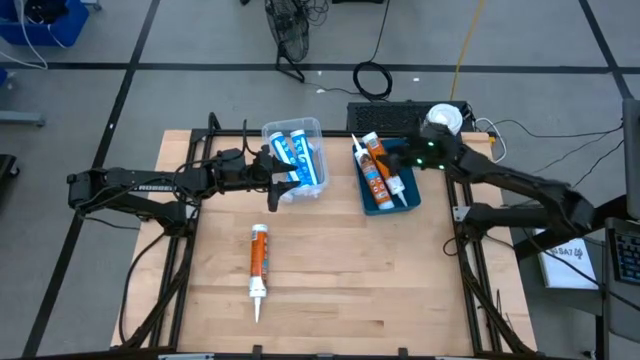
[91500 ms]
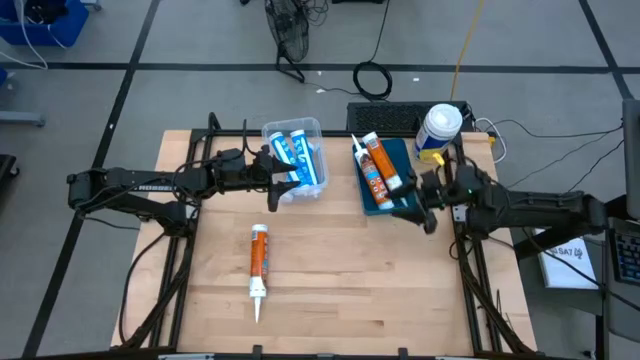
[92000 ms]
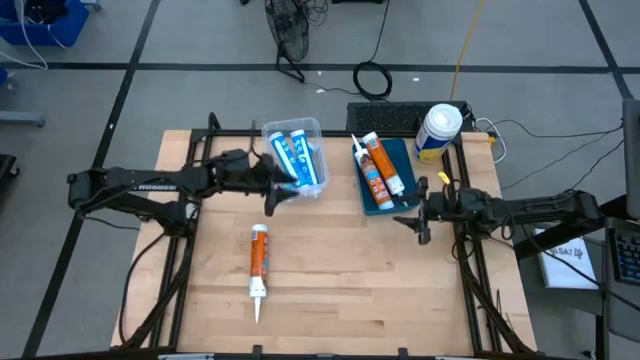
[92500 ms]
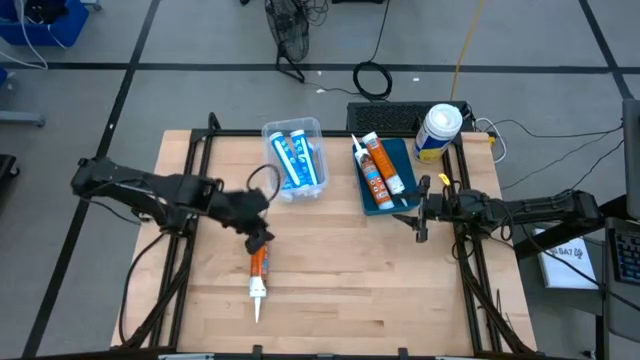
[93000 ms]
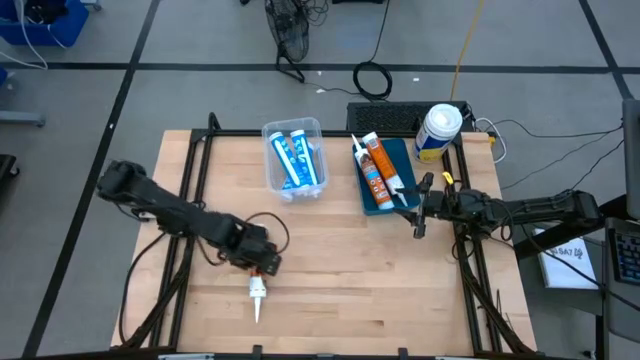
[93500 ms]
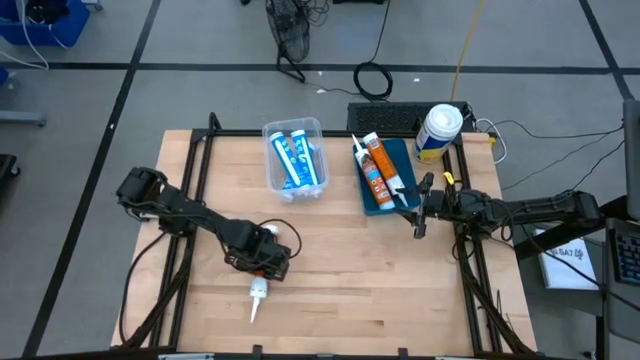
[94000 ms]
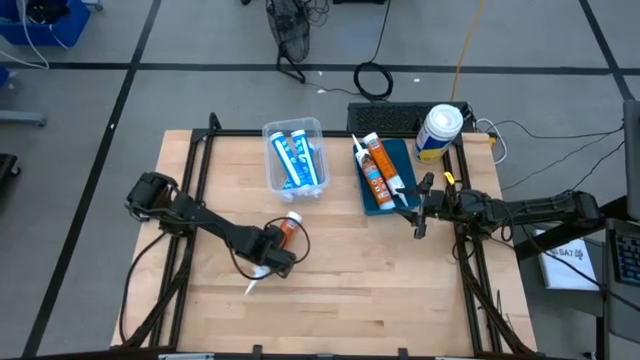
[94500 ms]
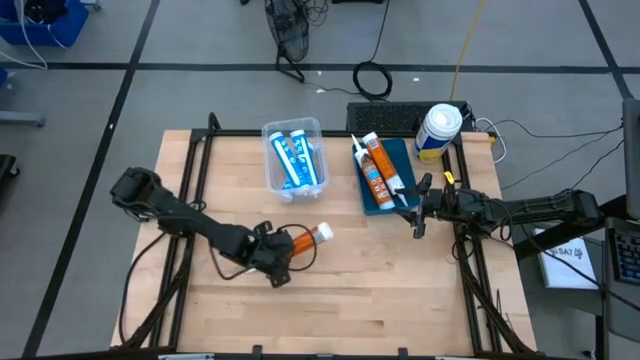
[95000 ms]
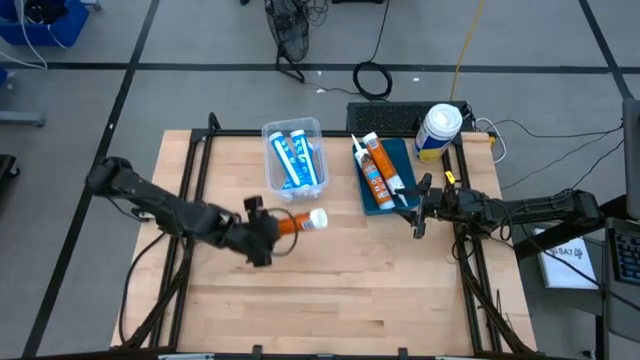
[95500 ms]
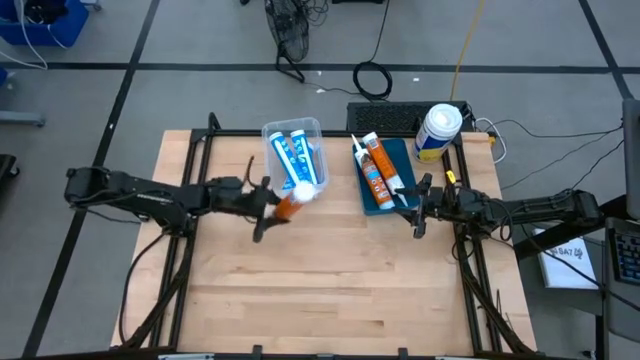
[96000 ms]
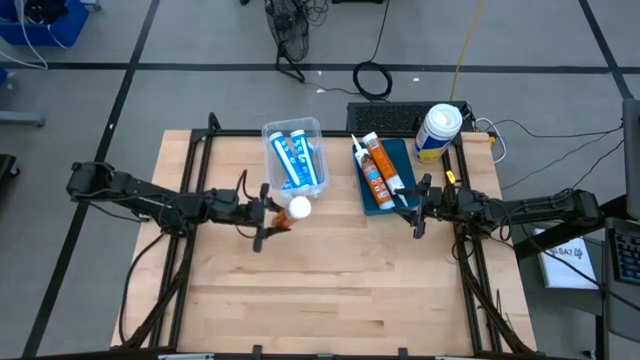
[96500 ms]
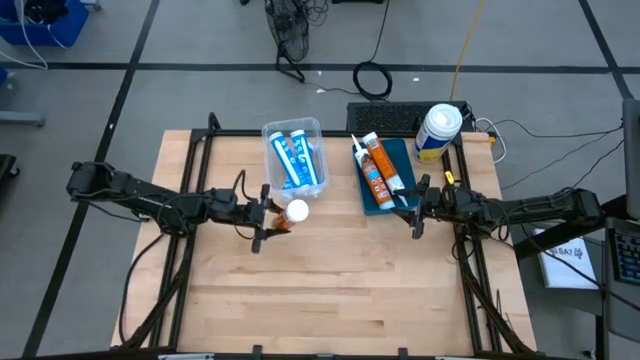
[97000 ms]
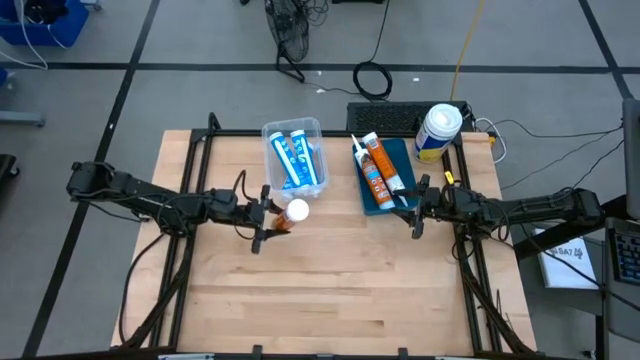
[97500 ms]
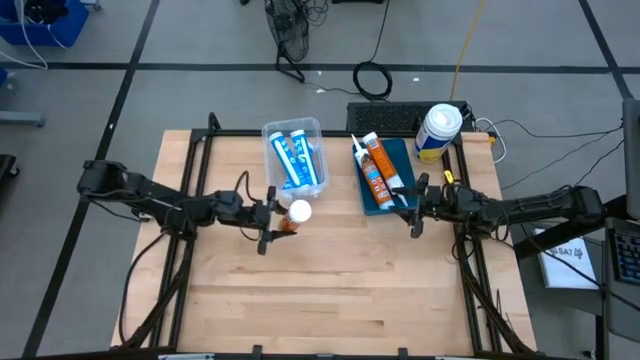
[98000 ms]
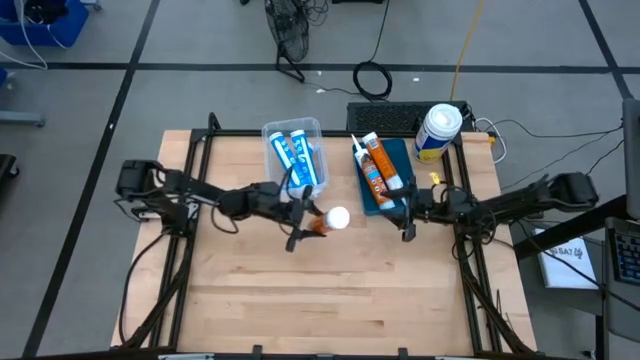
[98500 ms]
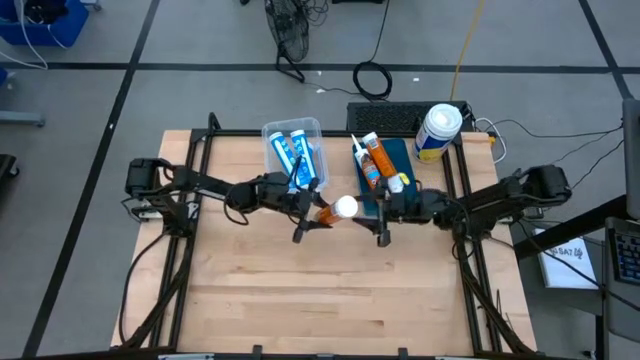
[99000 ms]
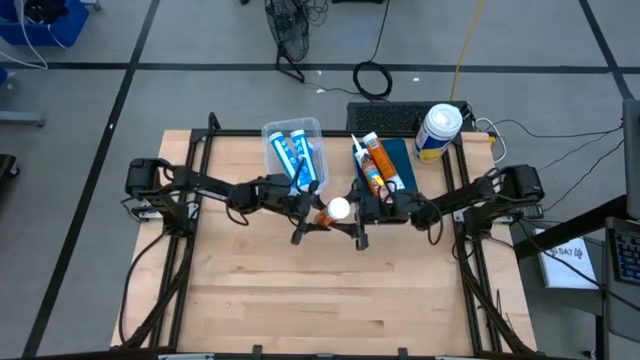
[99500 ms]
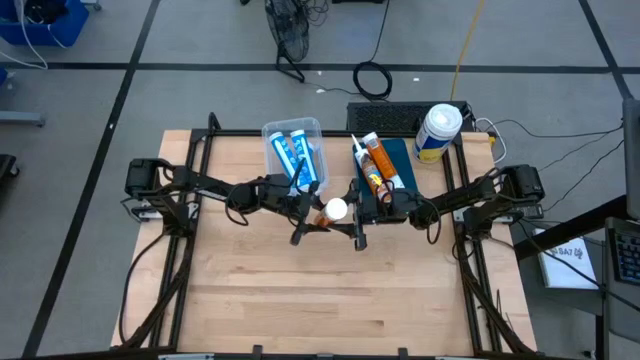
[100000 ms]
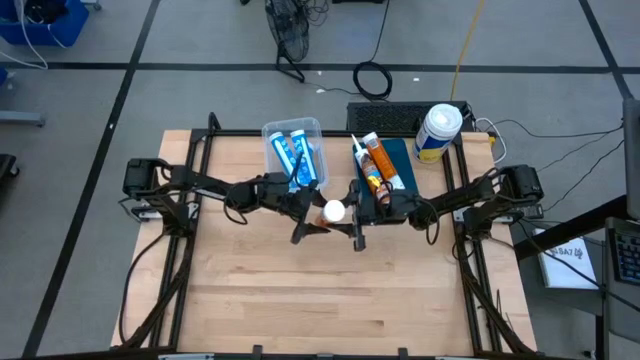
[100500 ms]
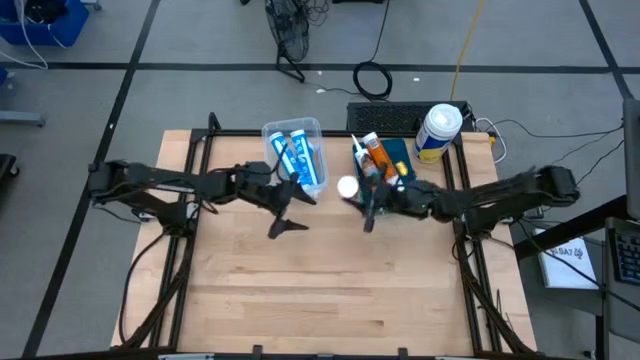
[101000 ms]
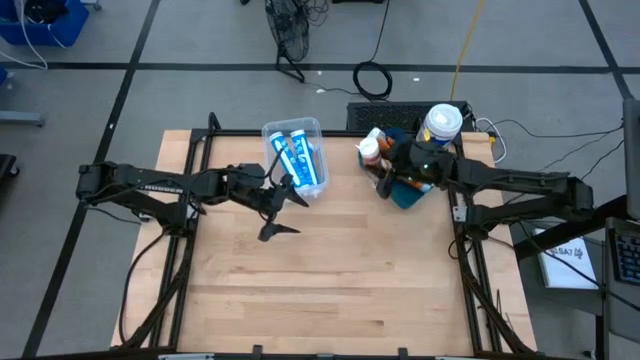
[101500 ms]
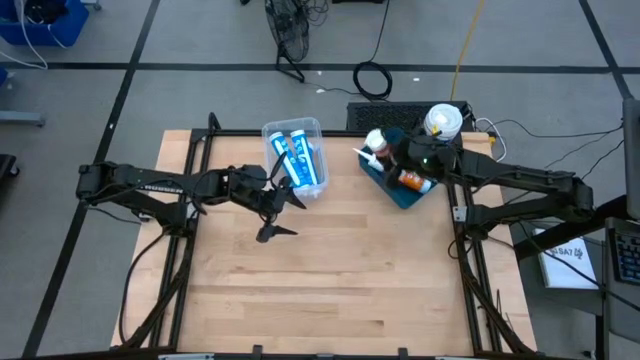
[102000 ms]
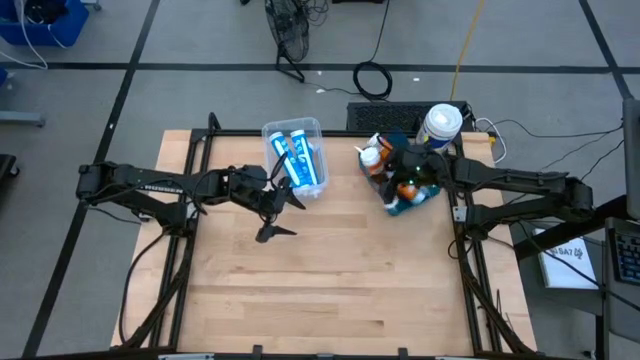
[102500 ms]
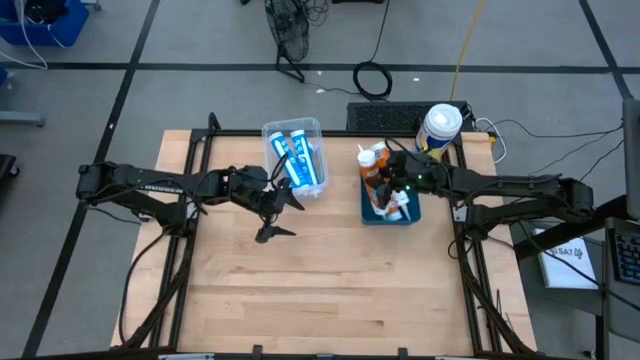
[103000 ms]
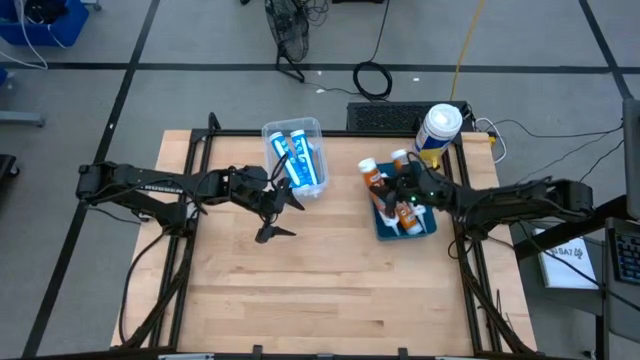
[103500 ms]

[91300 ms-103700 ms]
Task: Pick & place silicon tubes, Sealant and Lysol wipes
Put the orange sealant into the blue bin

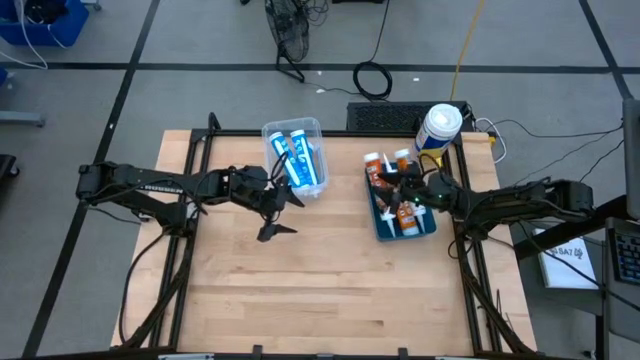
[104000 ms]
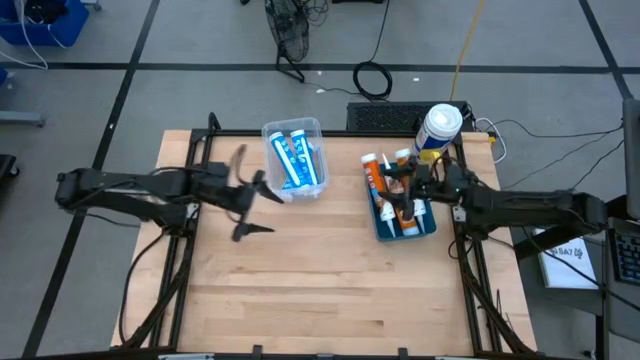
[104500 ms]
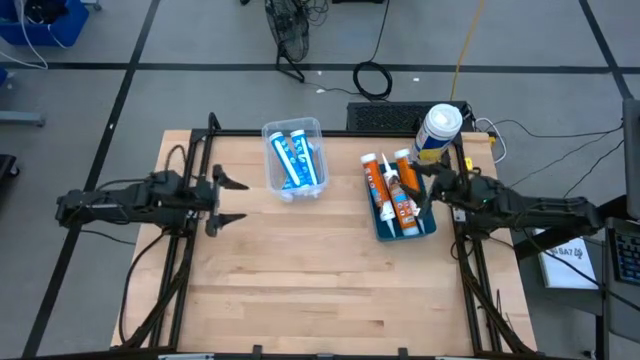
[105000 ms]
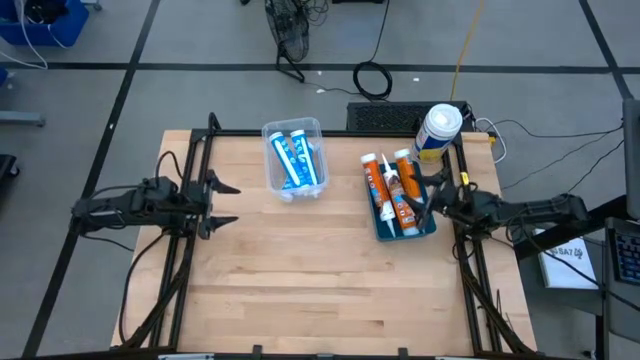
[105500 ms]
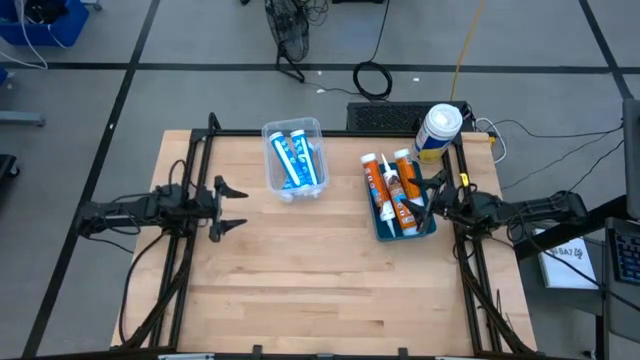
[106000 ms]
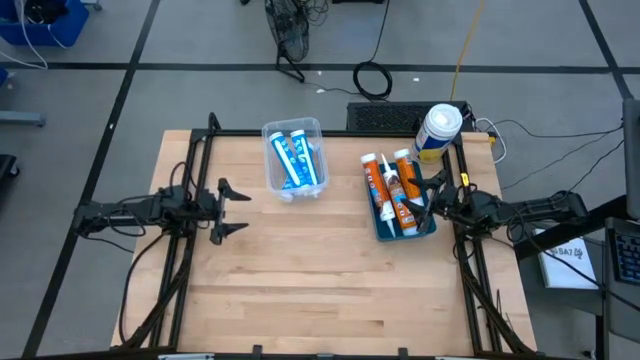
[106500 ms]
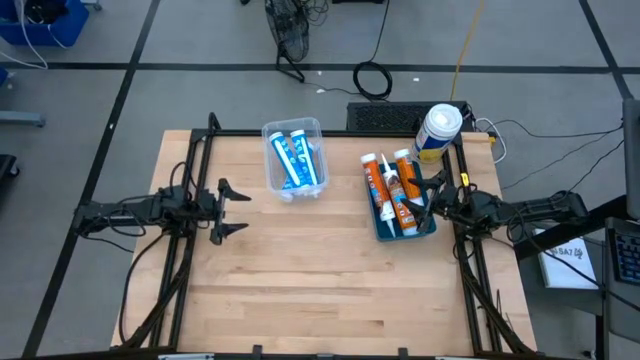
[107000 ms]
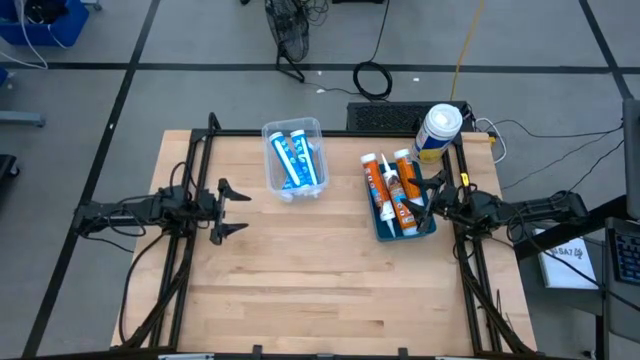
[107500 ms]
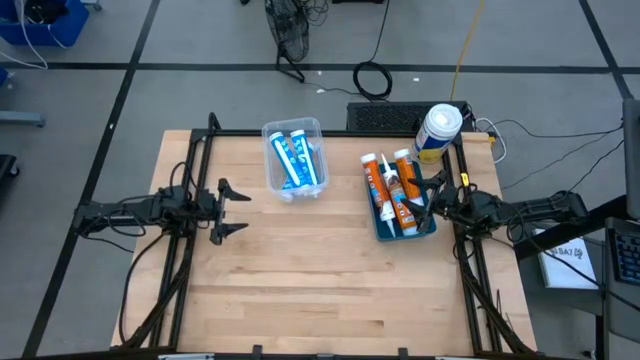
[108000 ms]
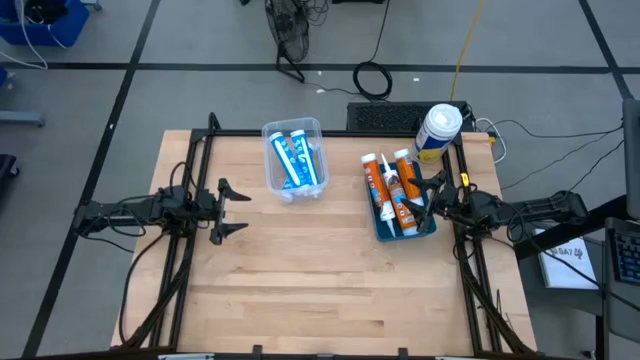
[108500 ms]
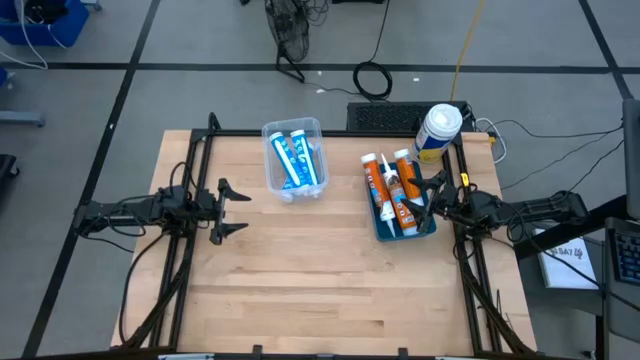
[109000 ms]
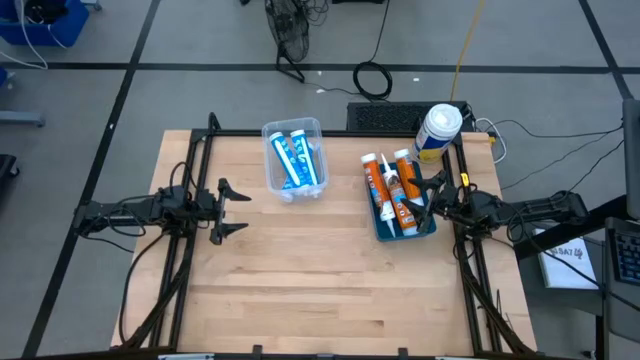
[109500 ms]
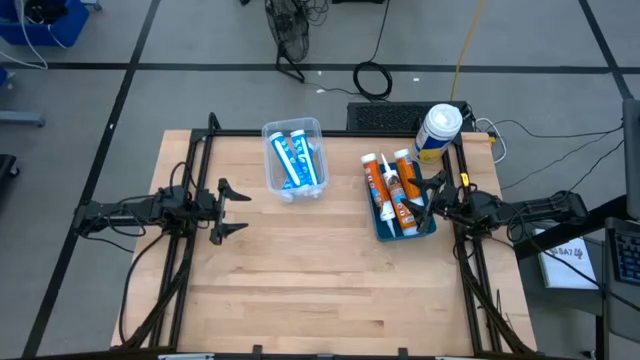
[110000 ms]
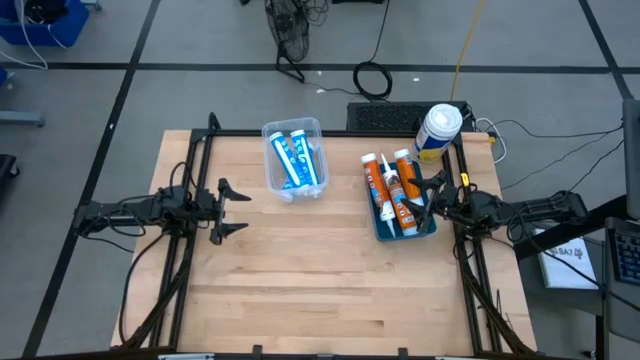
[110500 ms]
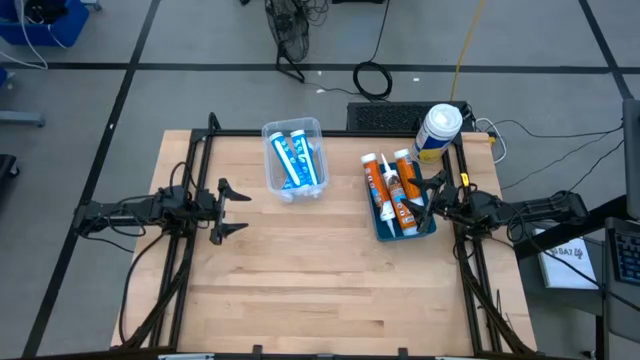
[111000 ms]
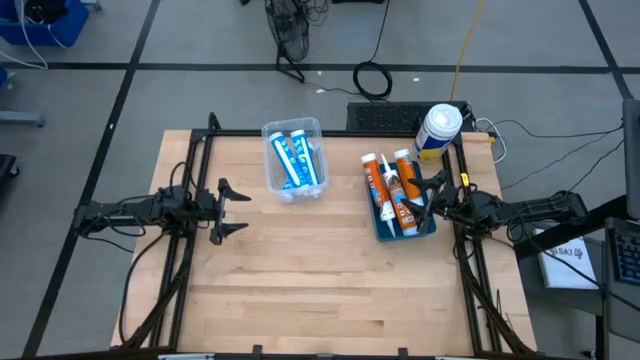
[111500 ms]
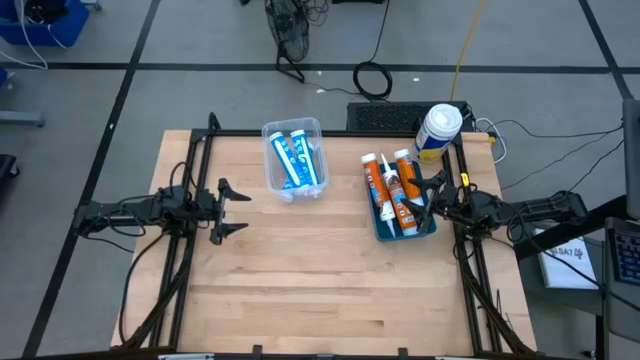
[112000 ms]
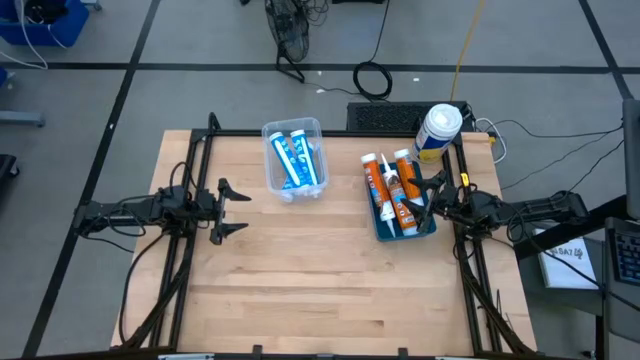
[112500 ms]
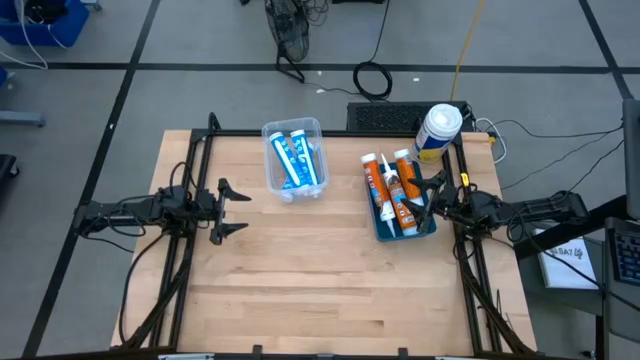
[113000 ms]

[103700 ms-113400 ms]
Return to Home Position
